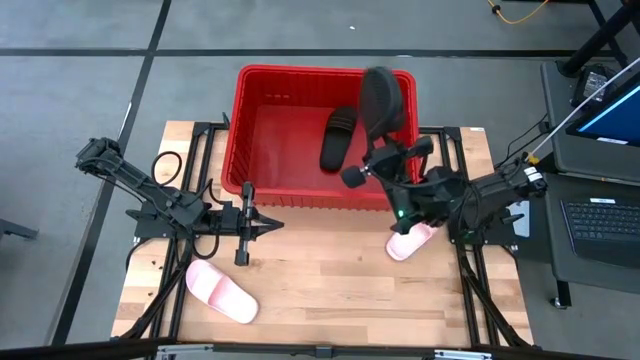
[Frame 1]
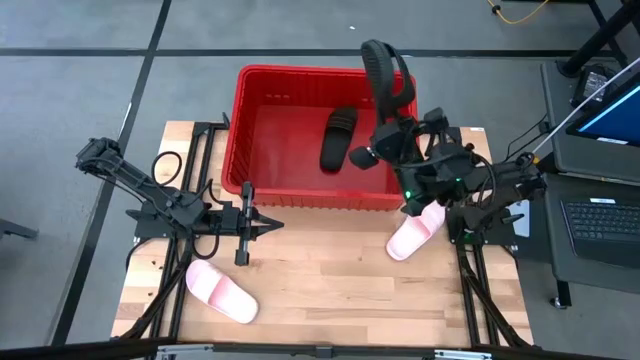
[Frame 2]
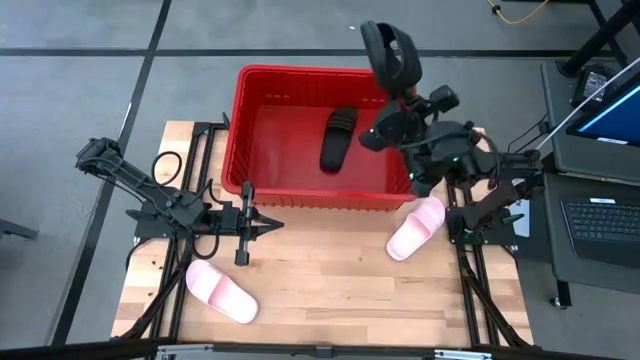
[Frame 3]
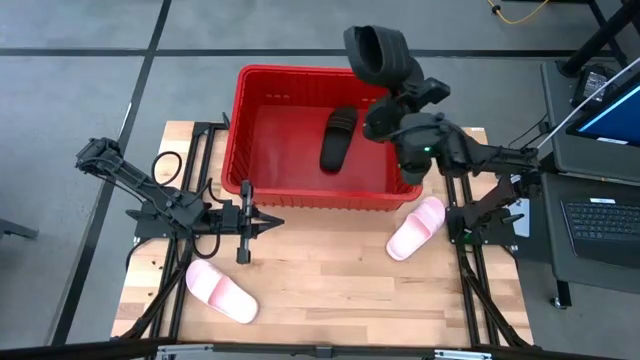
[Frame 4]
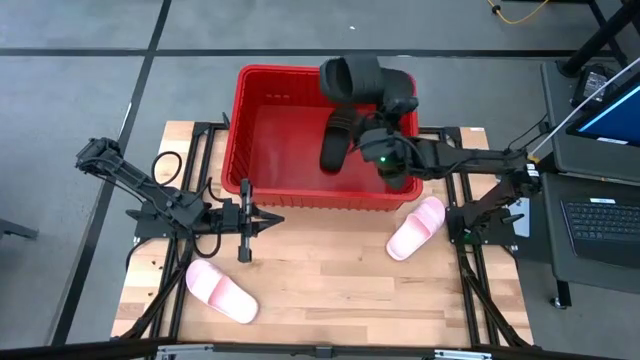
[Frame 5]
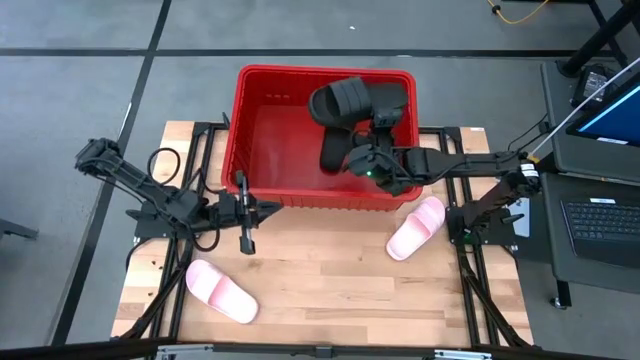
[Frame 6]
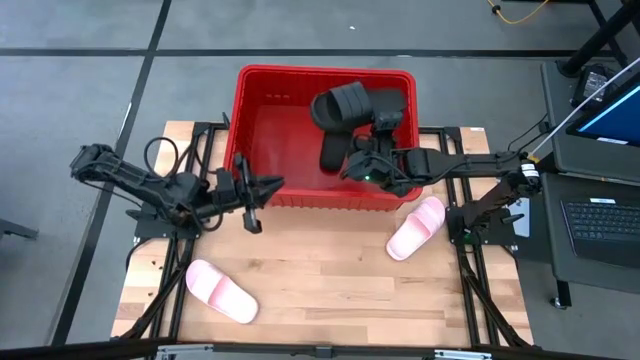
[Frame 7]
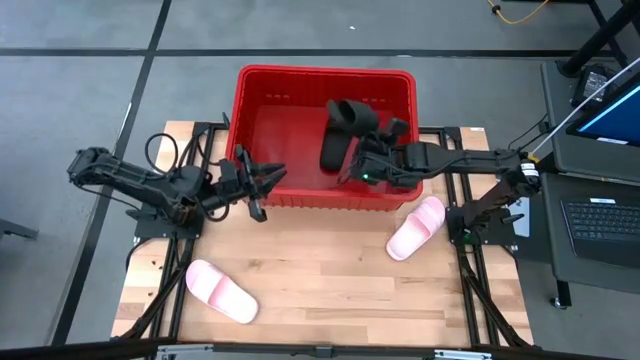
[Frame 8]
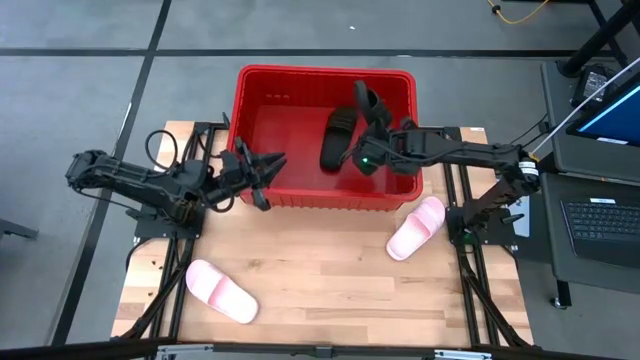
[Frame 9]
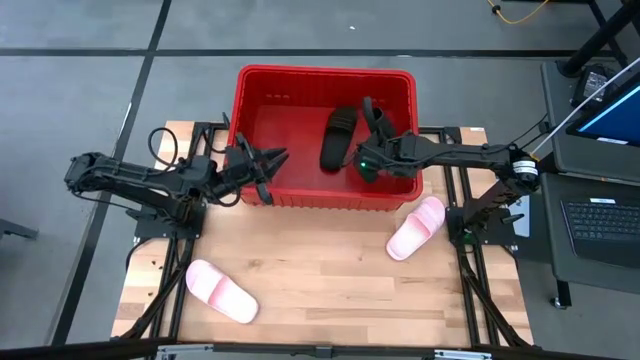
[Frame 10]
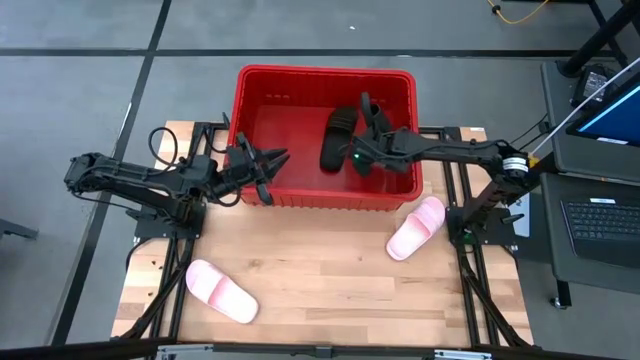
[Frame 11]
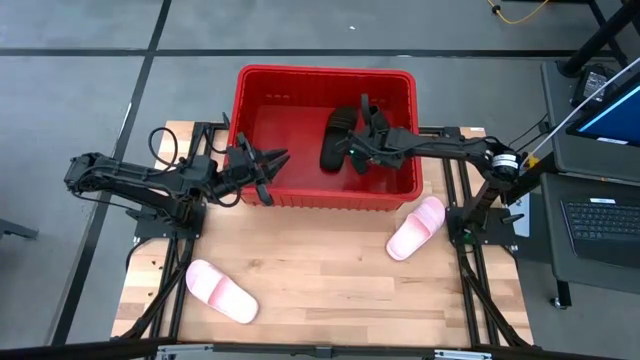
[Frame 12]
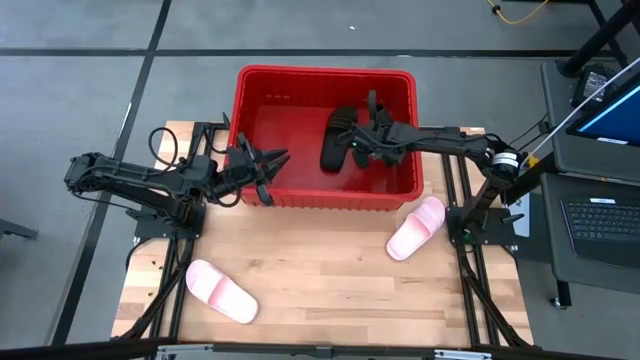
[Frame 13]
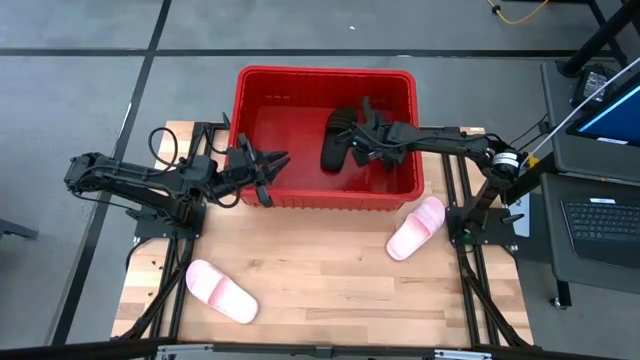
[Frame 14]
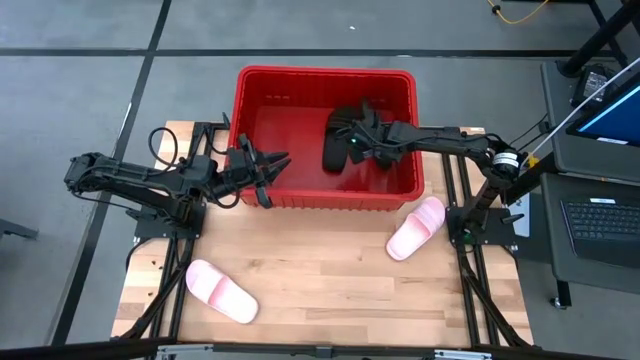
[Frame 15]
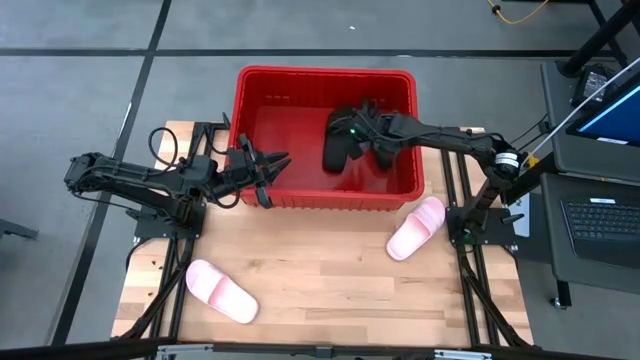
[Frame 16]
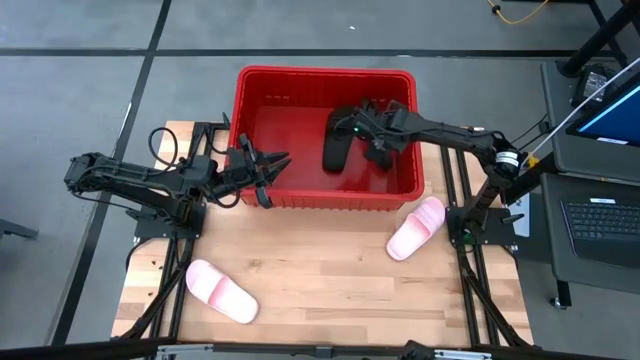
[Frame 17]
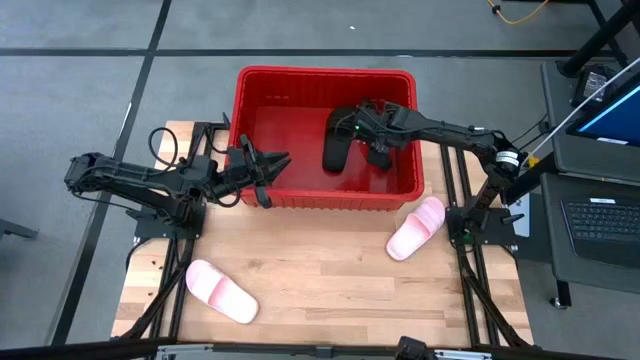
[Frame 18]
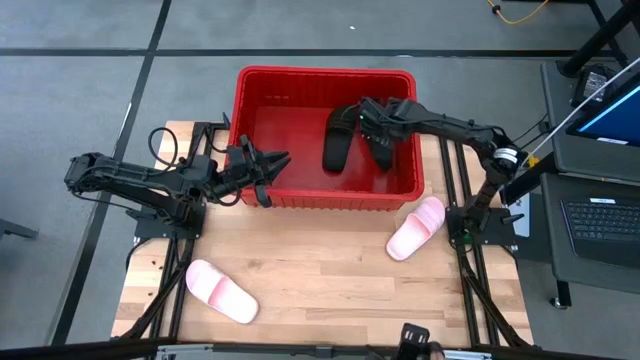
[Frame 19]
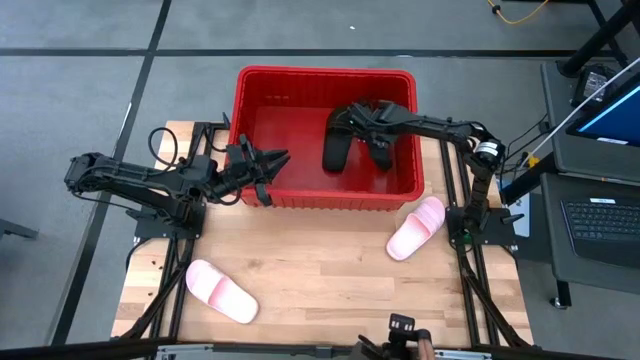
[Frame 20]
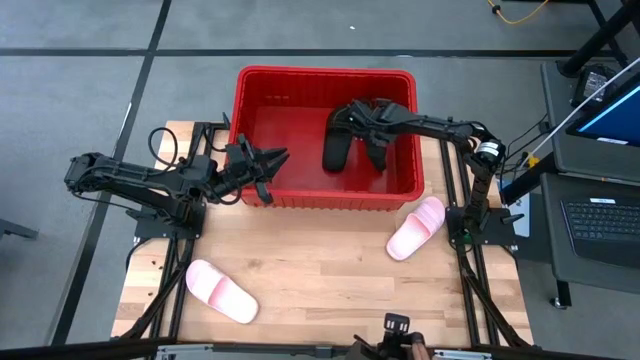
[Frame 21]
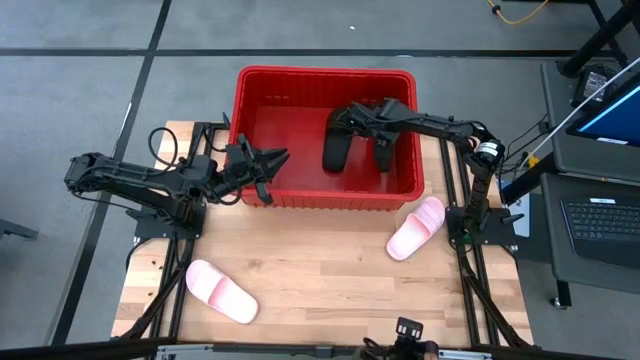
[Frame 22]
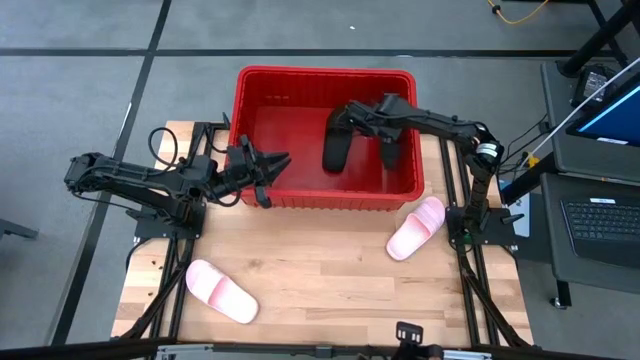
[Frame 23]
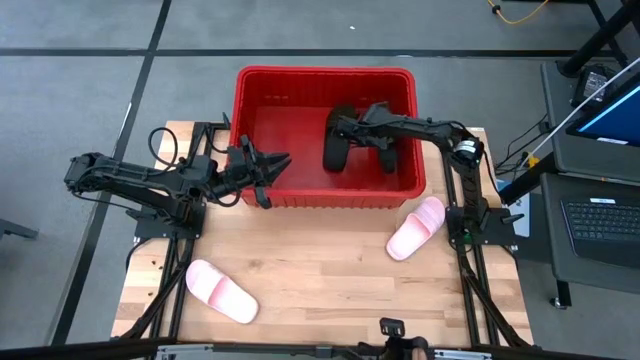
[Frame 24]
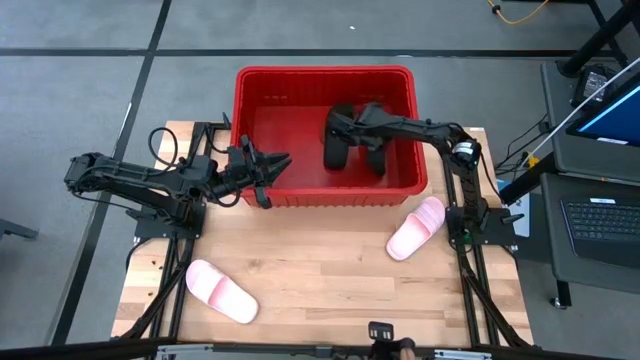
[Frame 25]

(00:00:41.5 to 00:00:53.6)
Task: Pick and place slides into bin
Put the black slide into the red bin

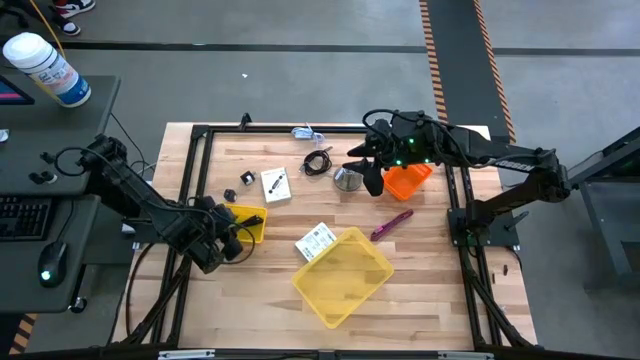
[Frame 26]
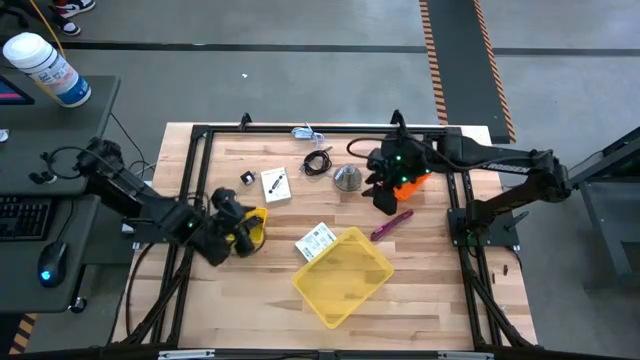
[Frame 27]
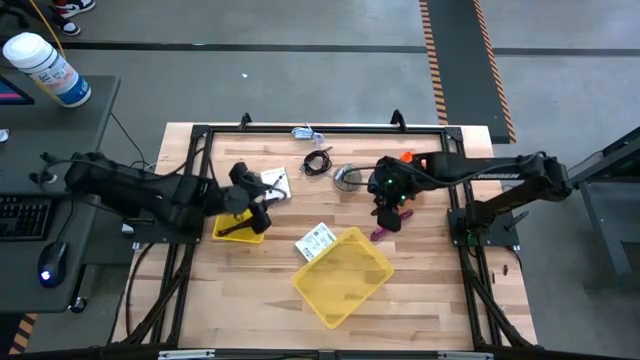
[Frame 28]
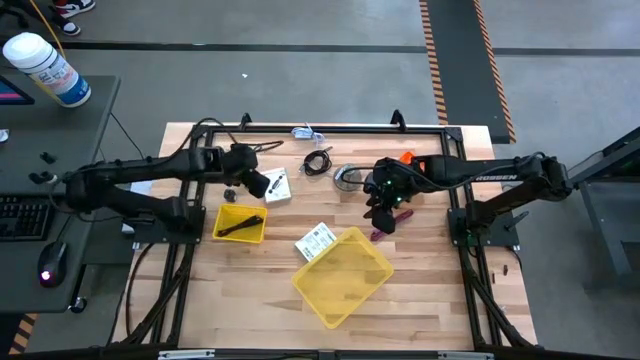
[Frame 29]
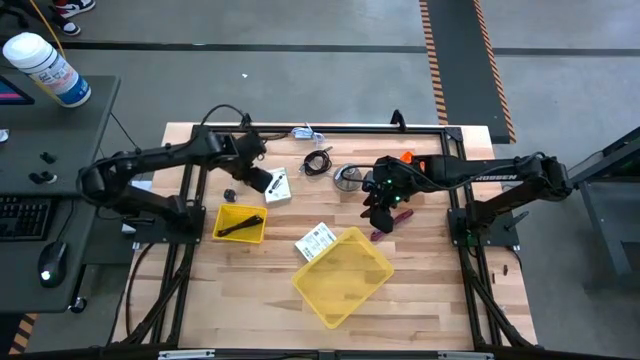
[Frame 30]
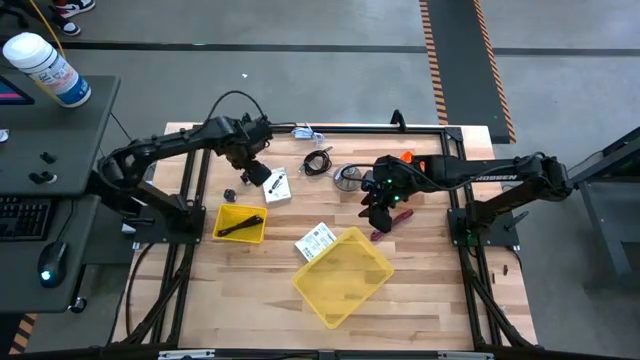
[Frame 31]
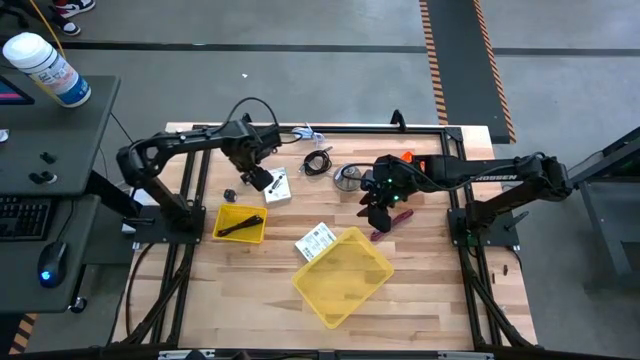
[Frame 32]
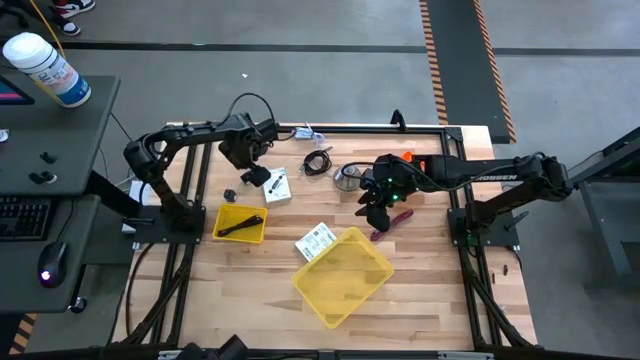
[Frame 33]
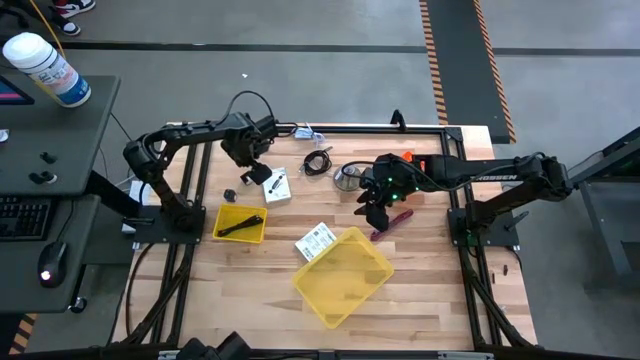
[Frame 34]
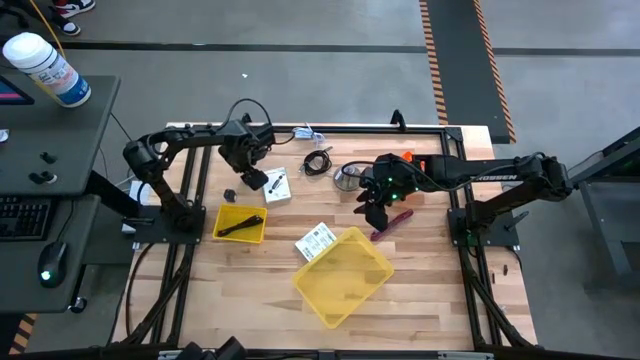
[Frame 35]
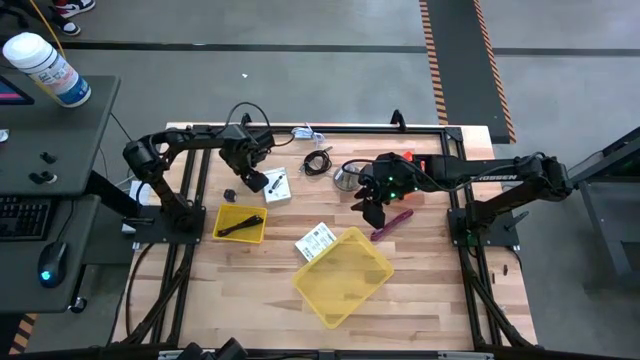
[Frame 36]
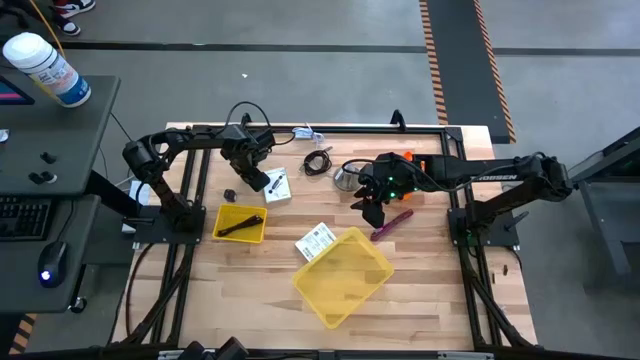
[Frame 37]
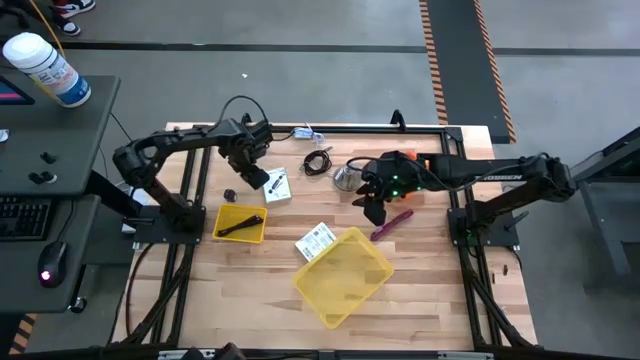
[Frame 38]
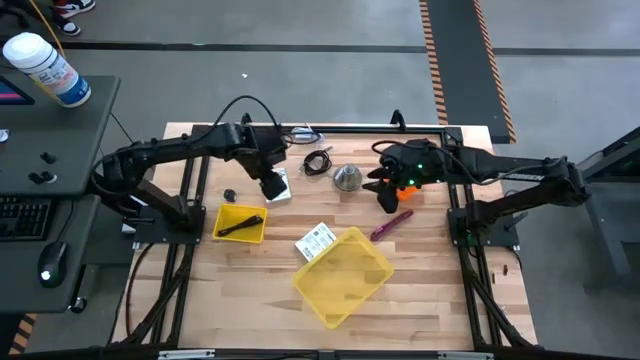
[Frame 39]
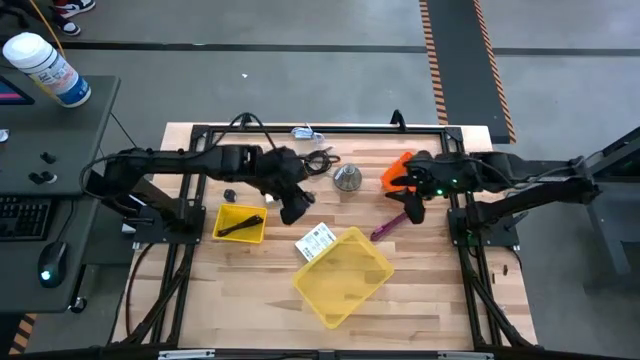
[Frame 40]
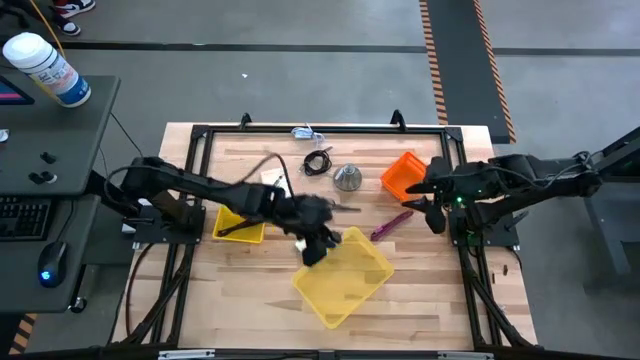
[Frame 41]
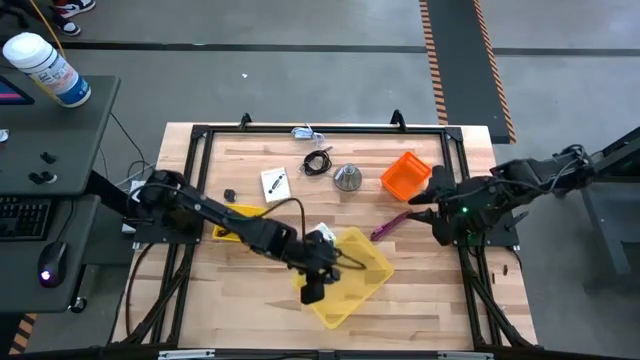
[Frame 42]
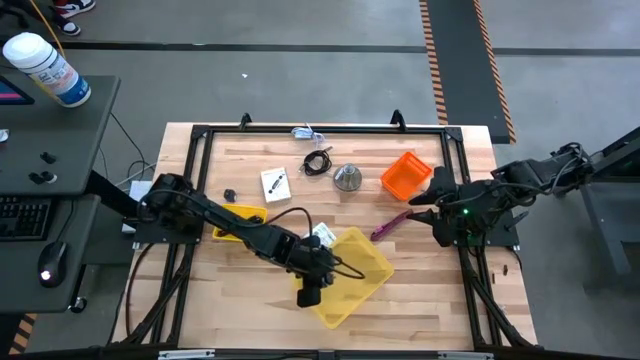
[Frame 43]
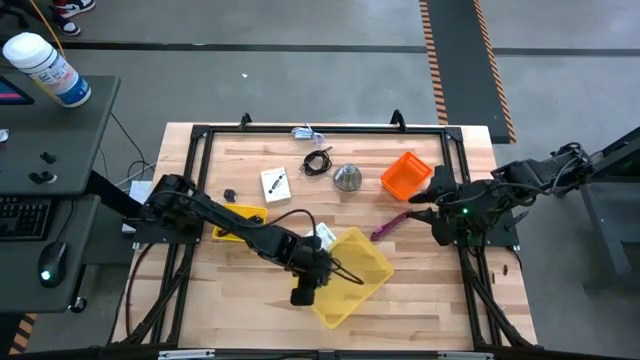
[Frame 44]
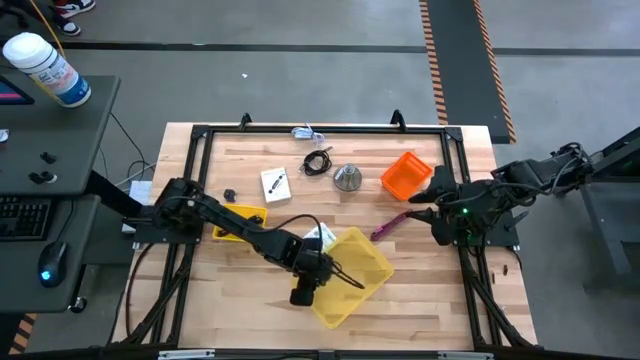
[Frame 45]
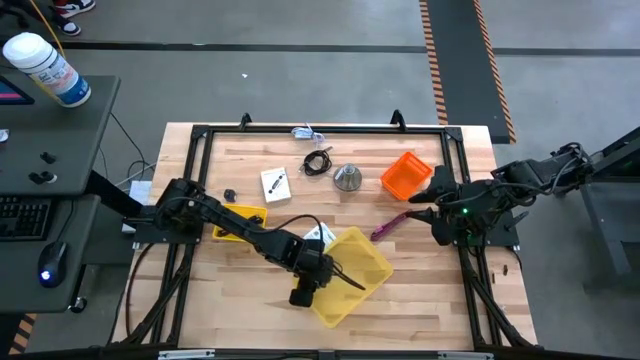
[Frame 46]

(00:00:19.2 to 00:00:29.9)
Task: Pick and place items into bin
Put the top black charger adapter into the right yellow bin
